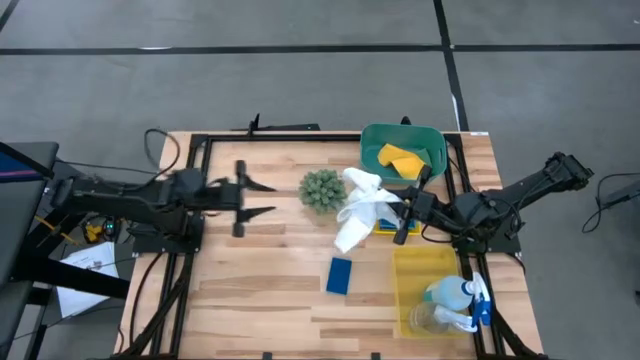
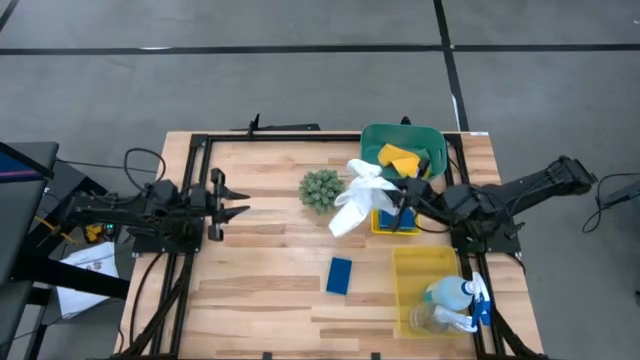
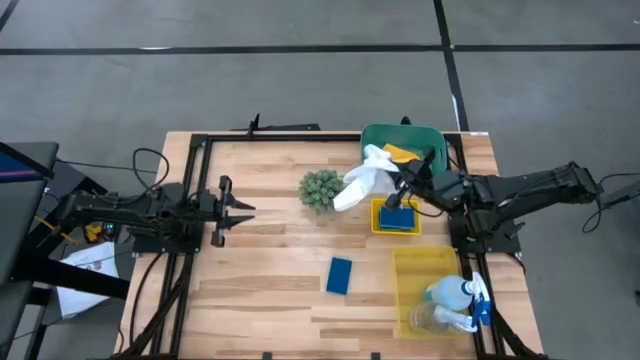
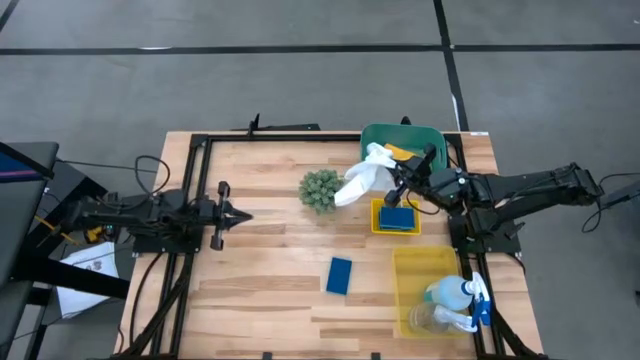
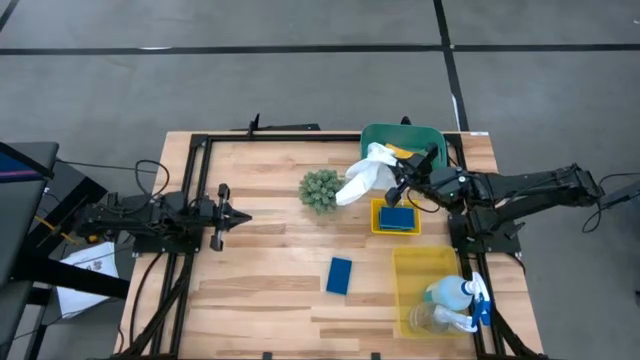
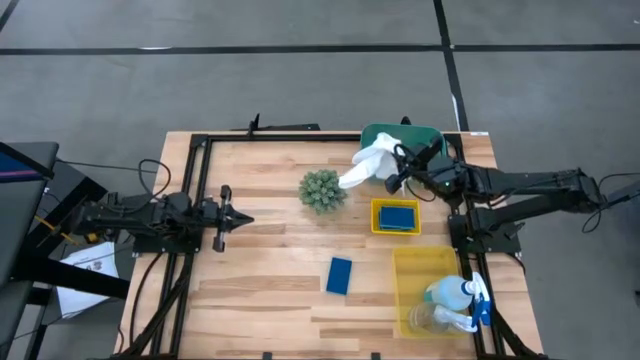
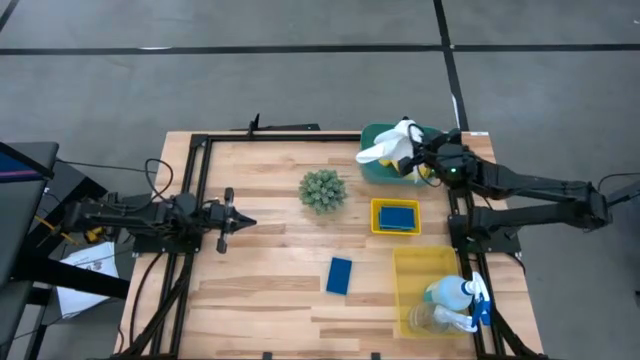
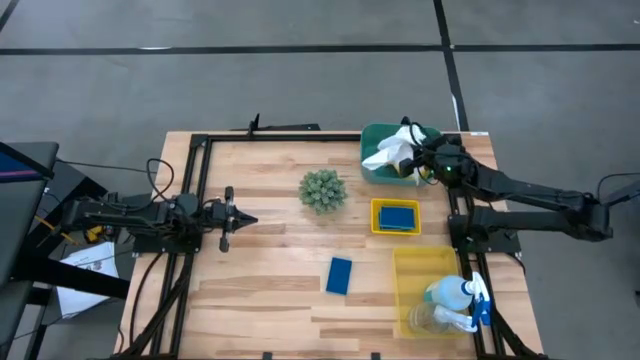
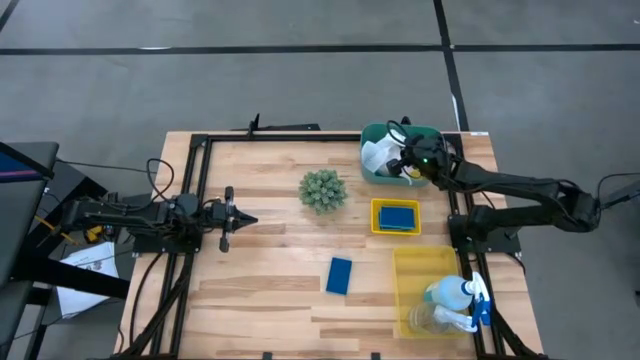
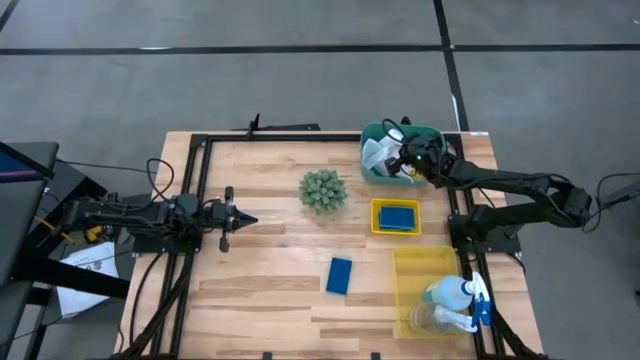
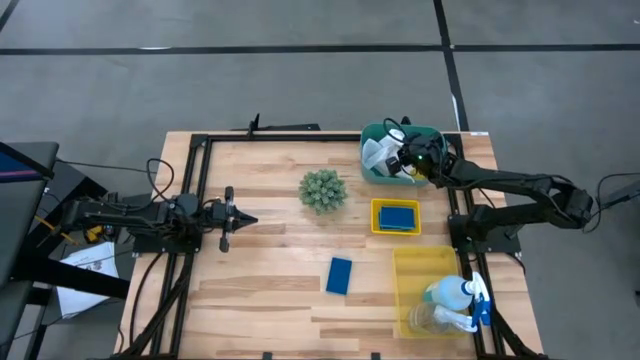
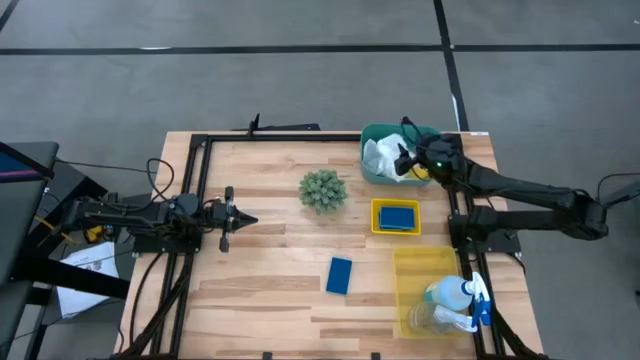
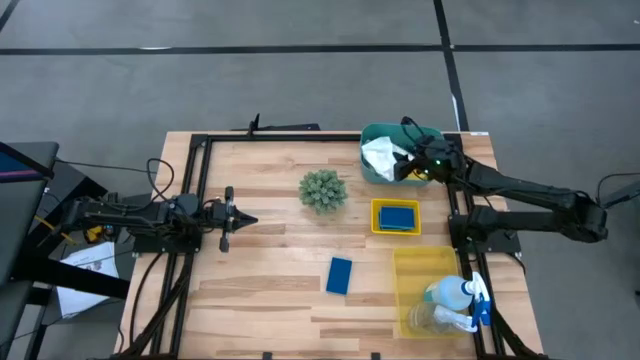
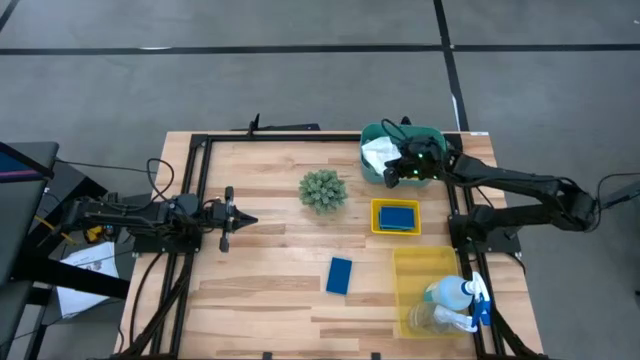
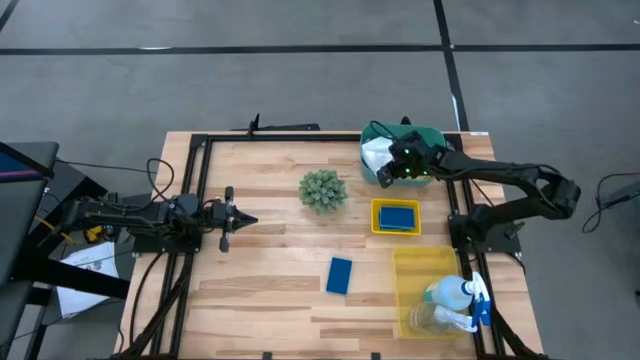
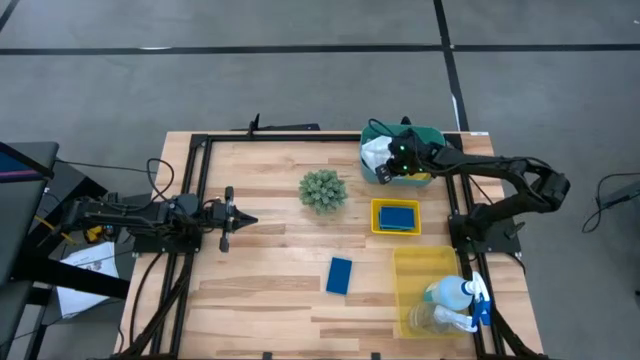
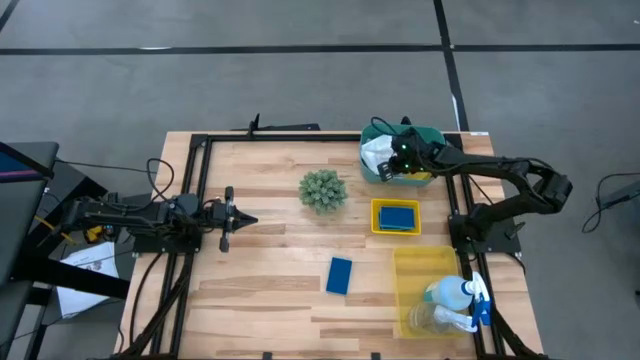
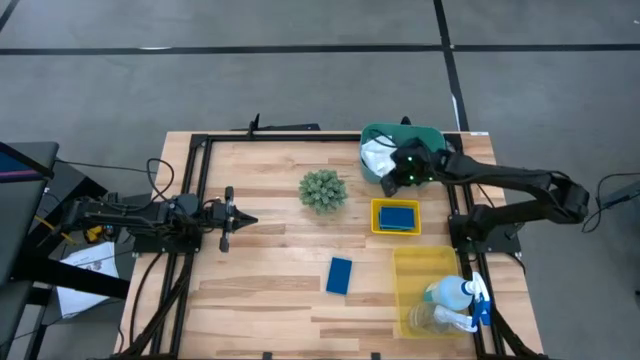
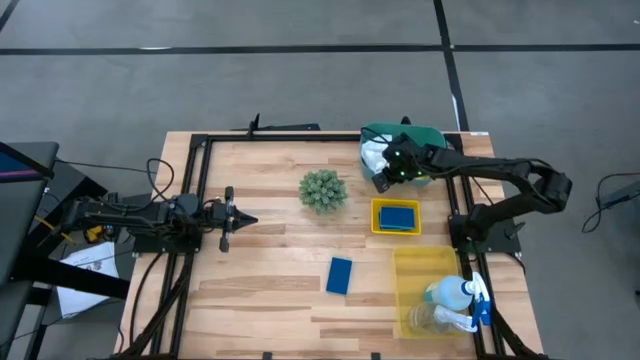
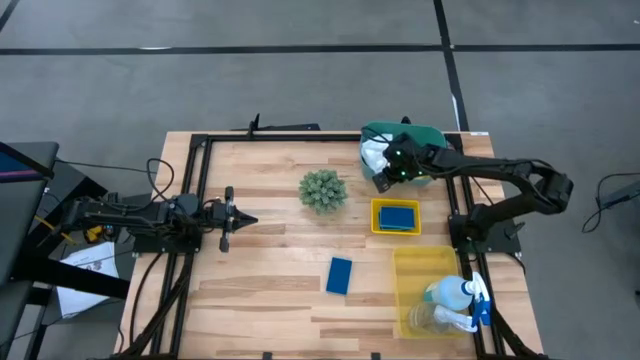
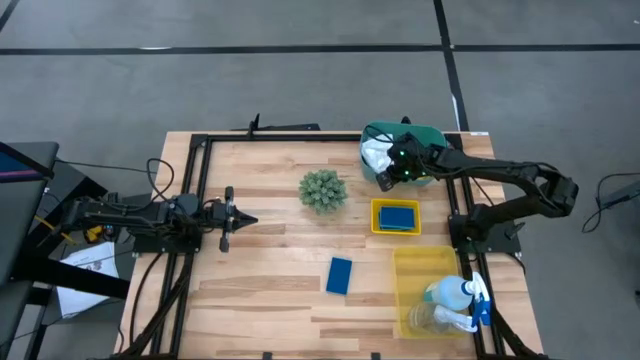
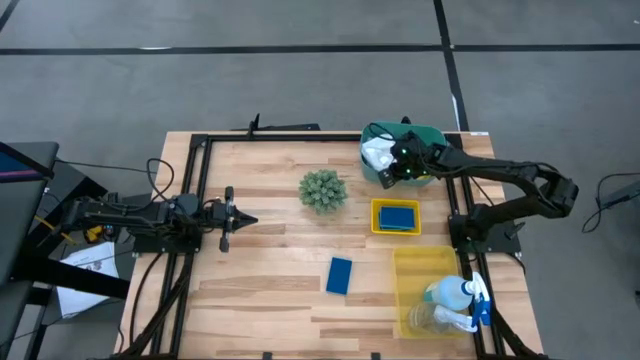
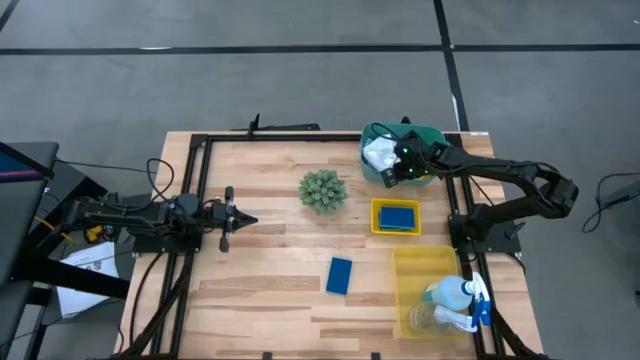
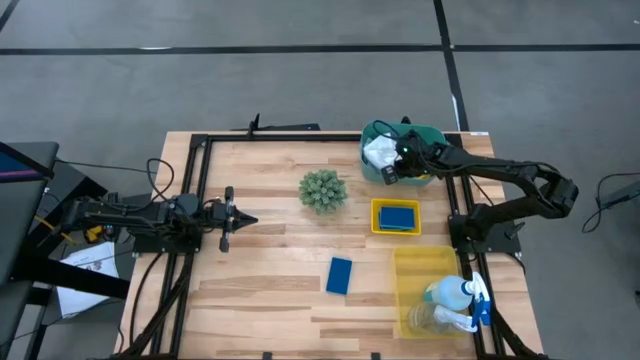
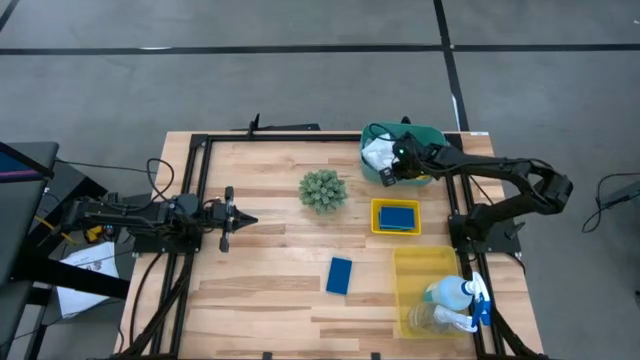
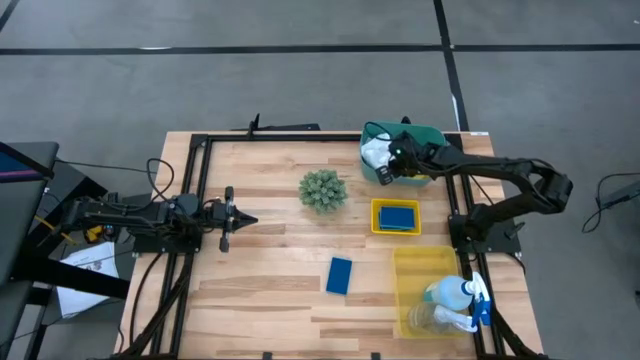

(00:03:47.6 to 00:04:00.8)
Task: Pick & Place Kitchen Items
Put the white towel into the green bin

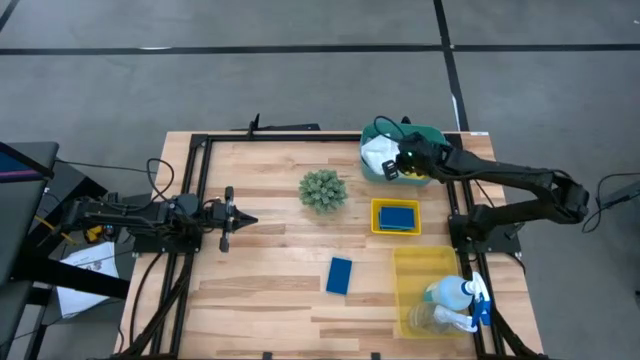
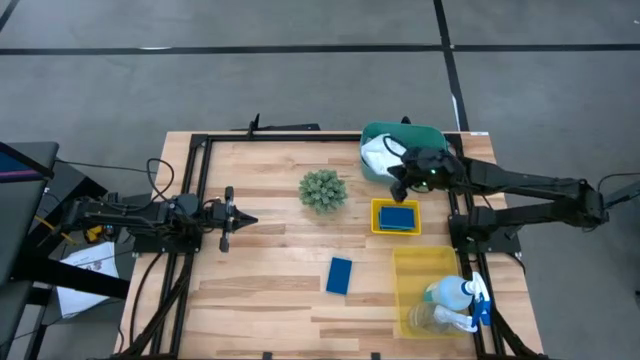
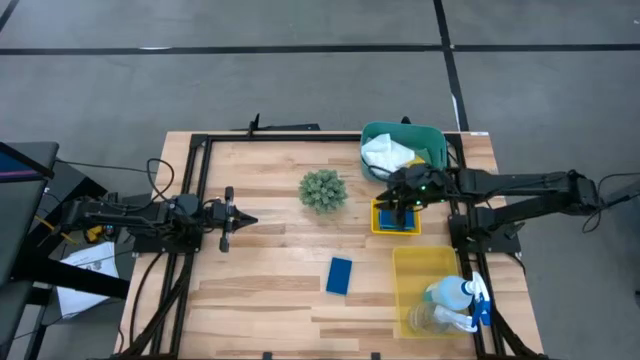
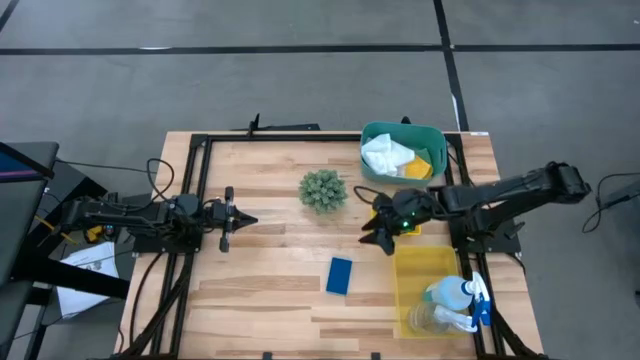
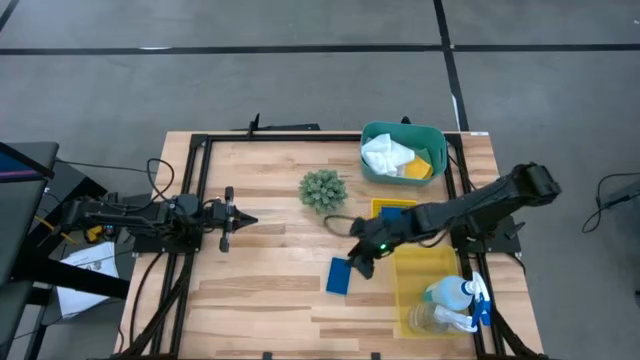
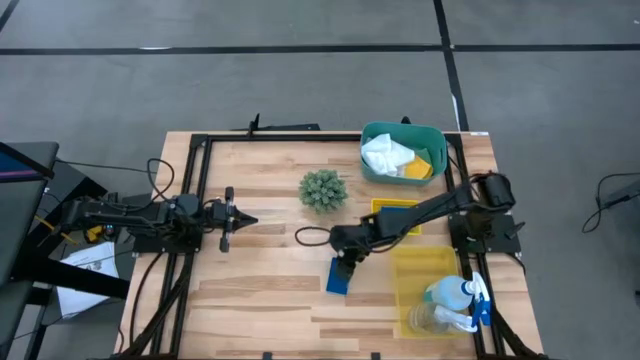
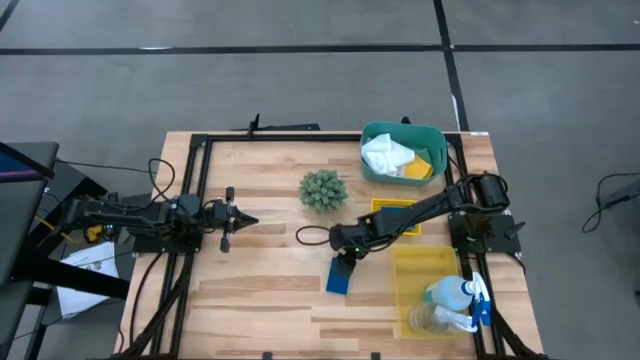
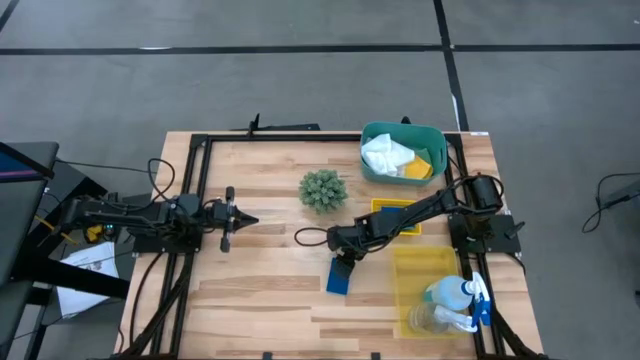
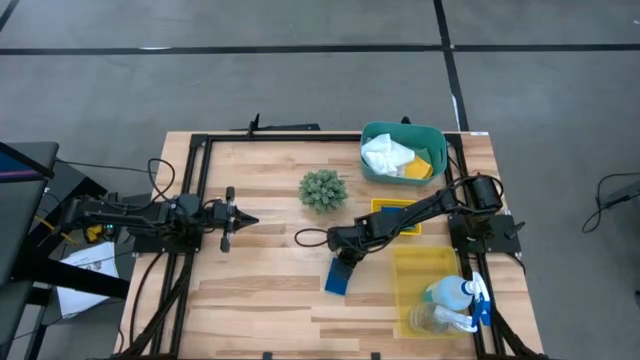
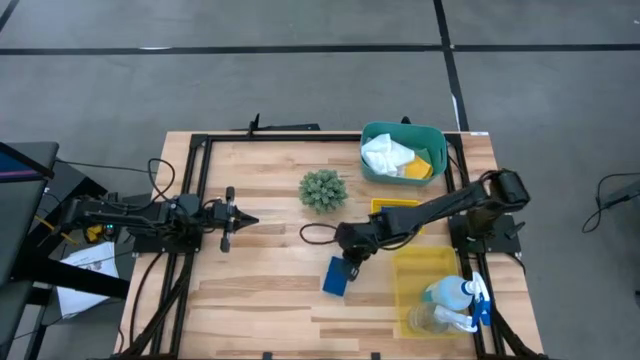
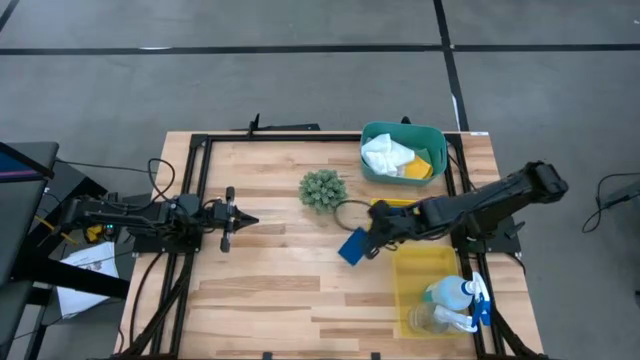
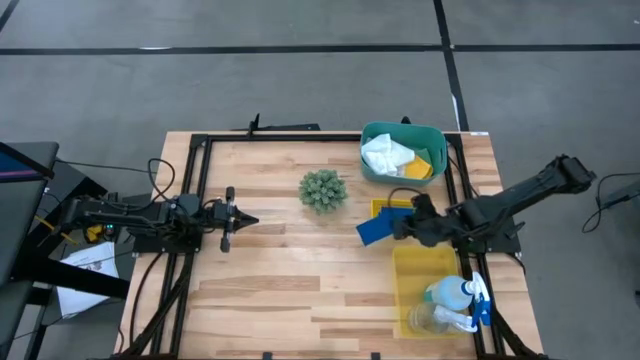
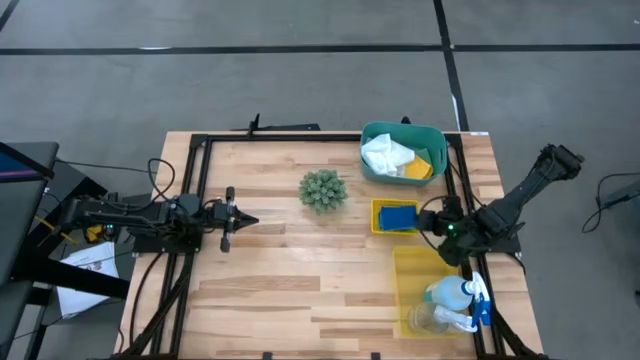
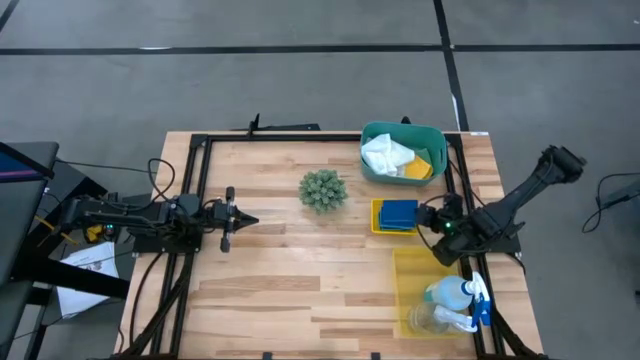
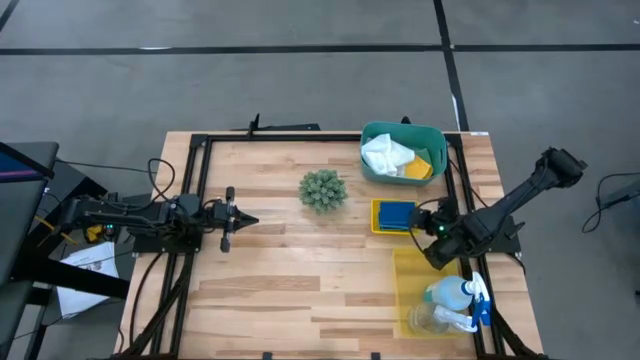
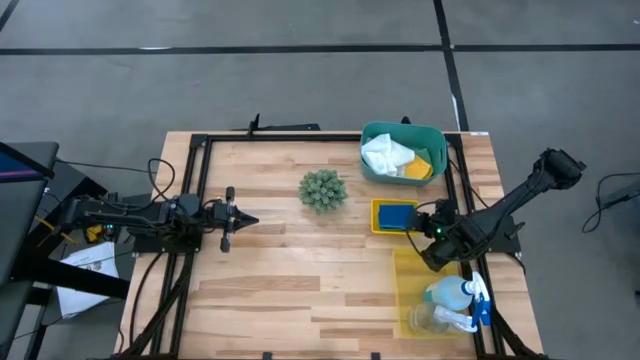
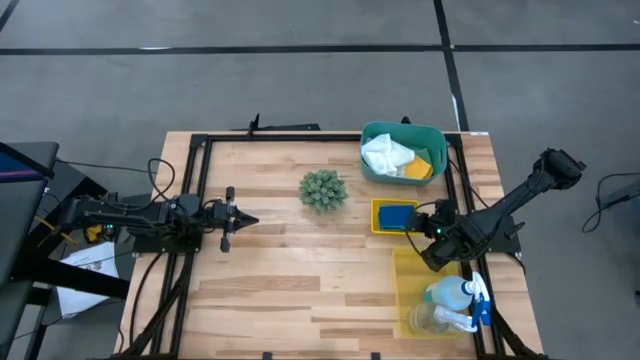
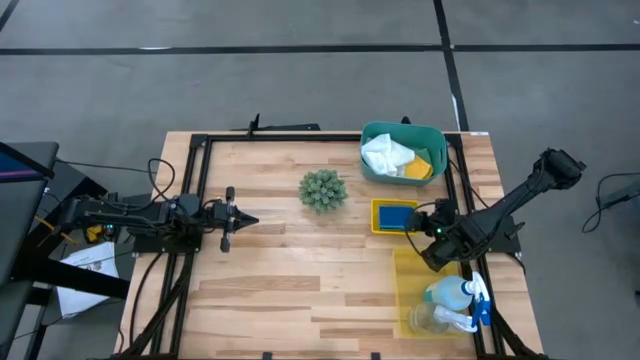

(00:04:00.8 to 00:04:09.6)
Put the blue sponge into the top yellow bin
